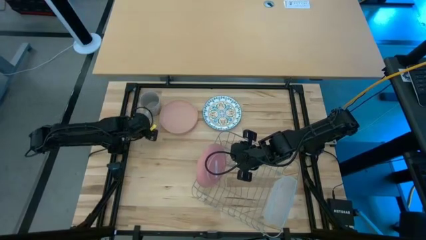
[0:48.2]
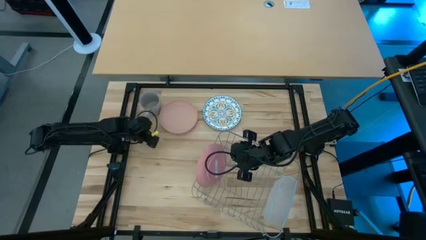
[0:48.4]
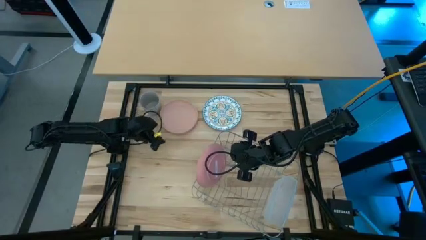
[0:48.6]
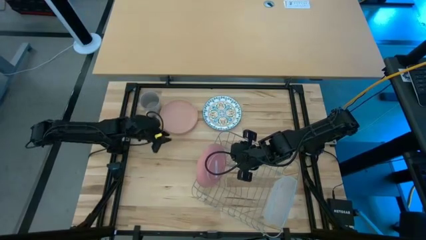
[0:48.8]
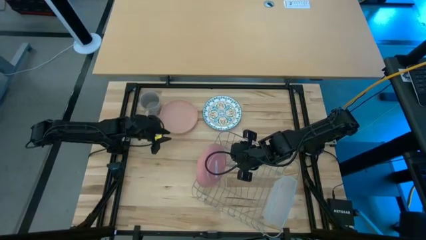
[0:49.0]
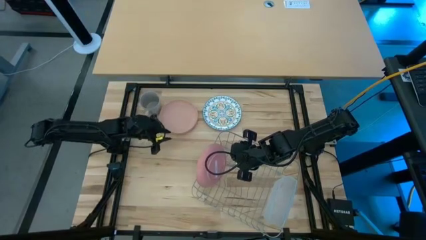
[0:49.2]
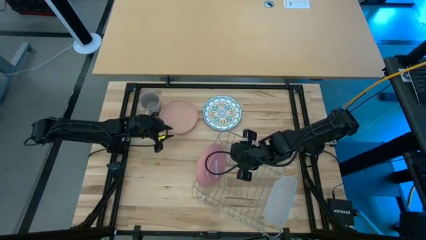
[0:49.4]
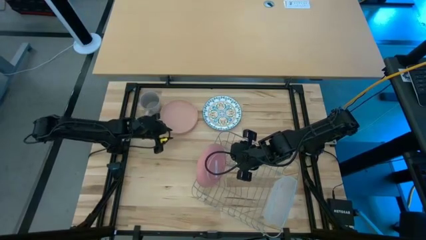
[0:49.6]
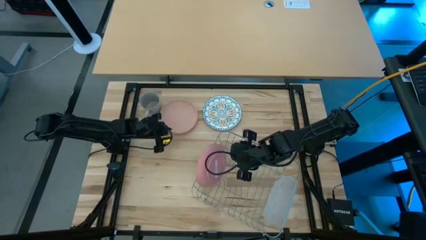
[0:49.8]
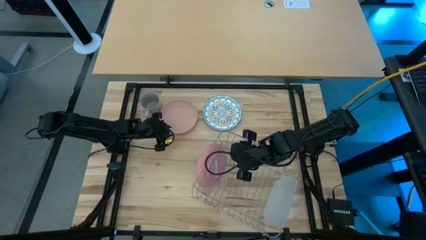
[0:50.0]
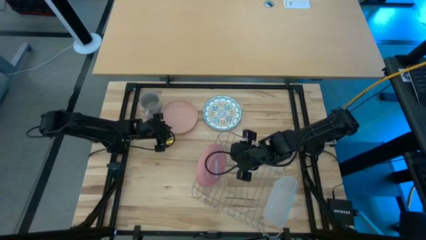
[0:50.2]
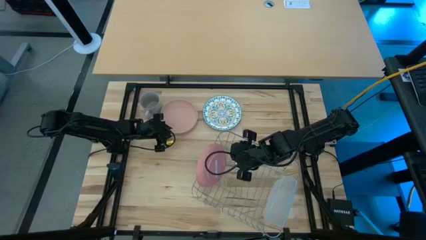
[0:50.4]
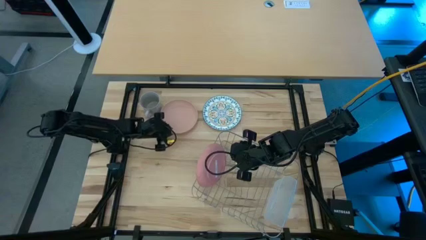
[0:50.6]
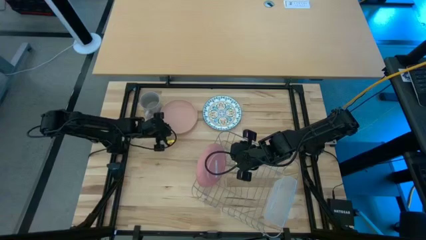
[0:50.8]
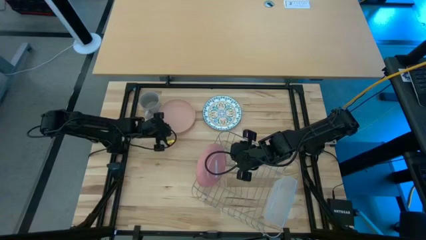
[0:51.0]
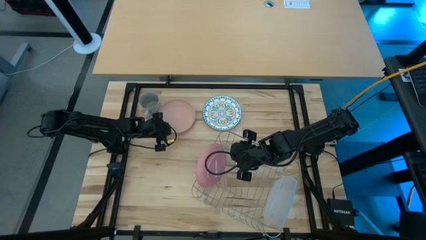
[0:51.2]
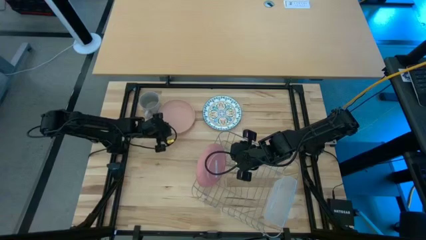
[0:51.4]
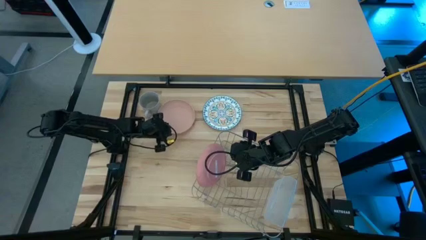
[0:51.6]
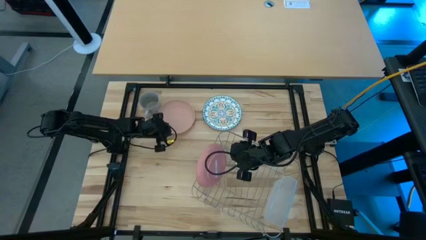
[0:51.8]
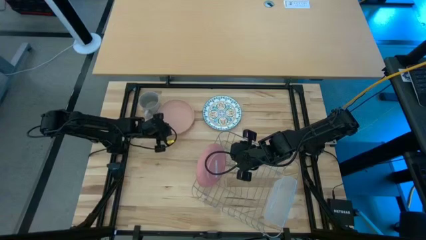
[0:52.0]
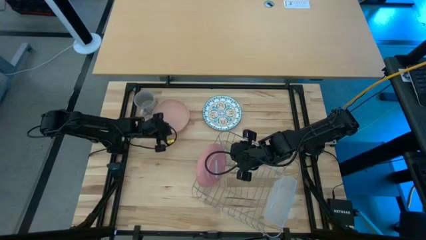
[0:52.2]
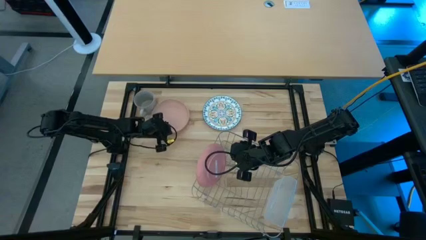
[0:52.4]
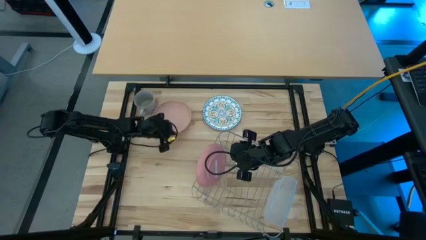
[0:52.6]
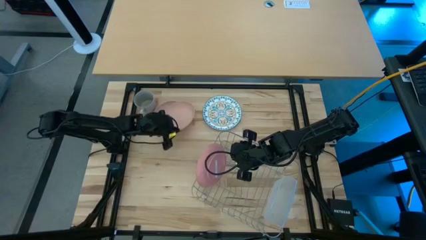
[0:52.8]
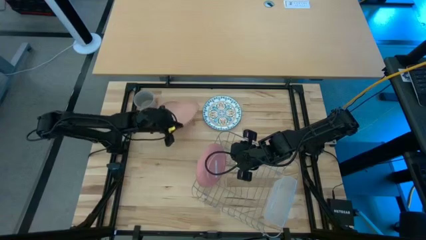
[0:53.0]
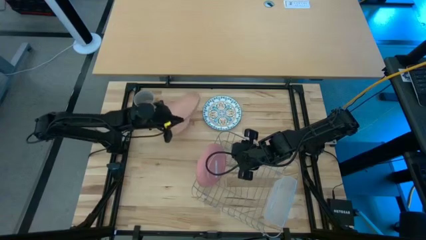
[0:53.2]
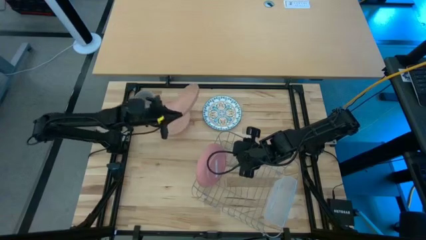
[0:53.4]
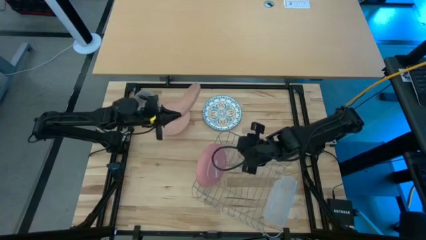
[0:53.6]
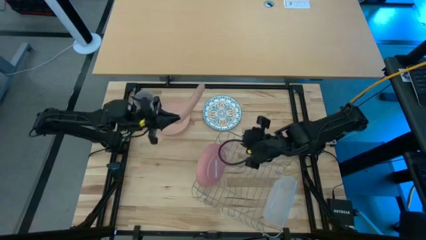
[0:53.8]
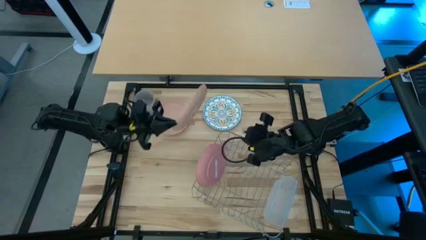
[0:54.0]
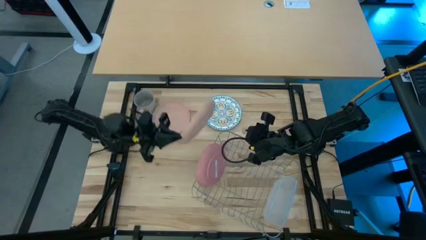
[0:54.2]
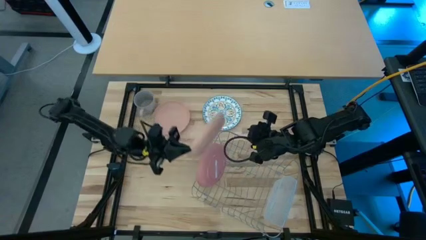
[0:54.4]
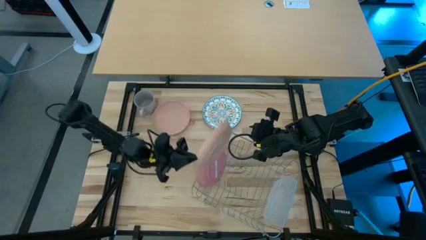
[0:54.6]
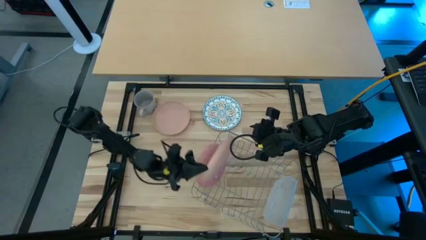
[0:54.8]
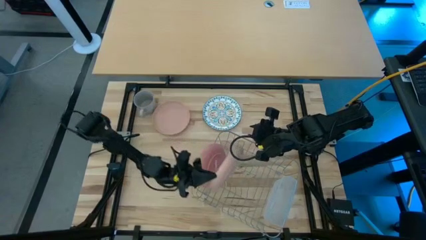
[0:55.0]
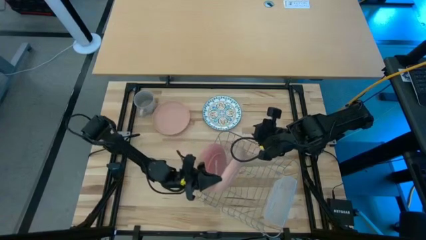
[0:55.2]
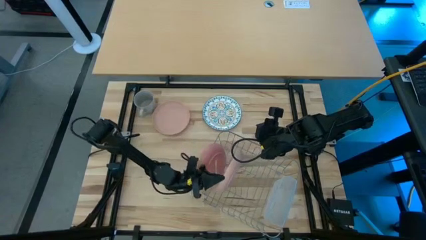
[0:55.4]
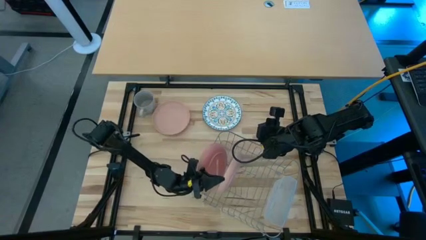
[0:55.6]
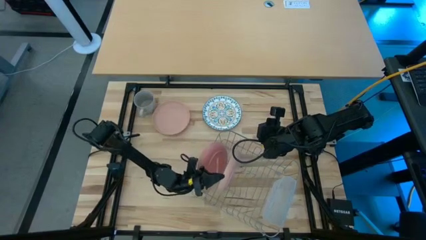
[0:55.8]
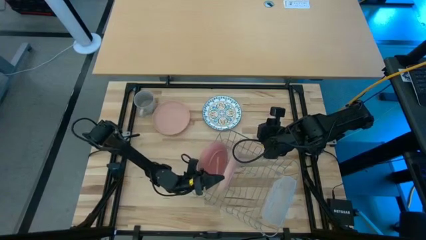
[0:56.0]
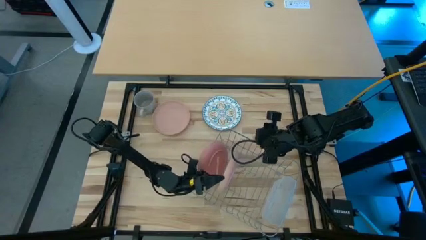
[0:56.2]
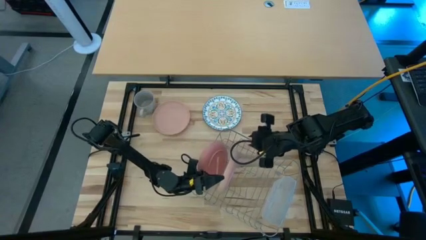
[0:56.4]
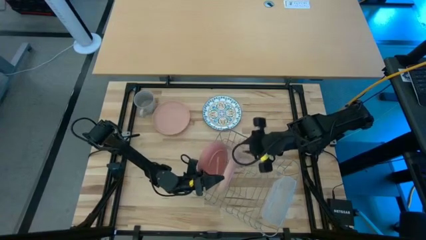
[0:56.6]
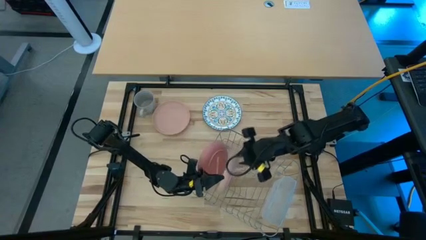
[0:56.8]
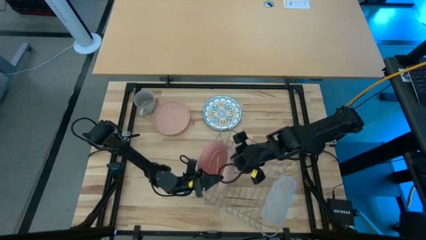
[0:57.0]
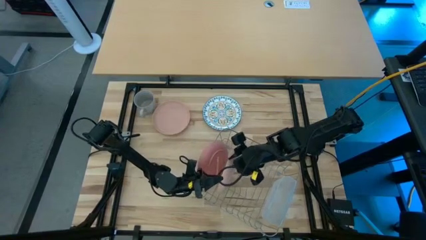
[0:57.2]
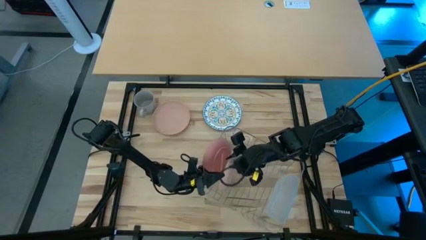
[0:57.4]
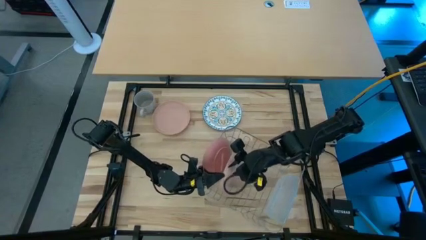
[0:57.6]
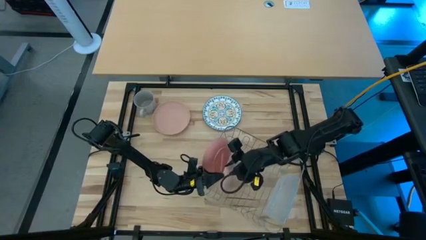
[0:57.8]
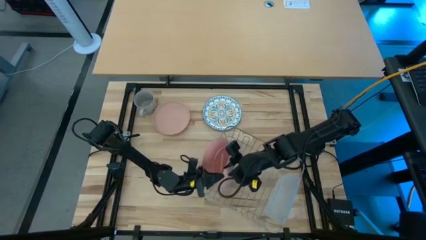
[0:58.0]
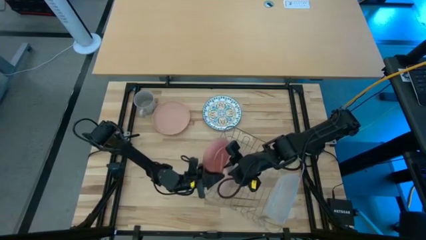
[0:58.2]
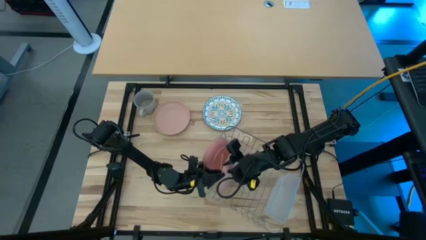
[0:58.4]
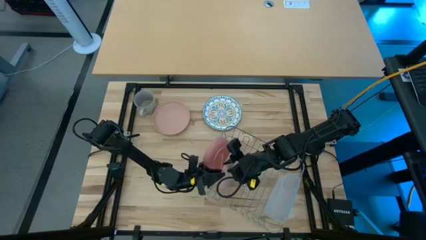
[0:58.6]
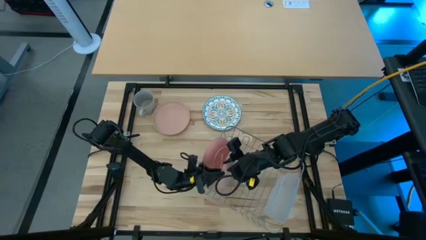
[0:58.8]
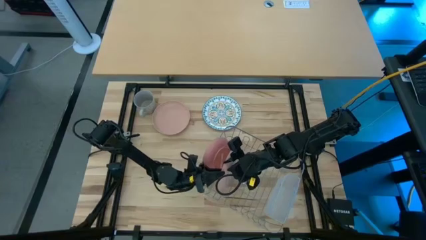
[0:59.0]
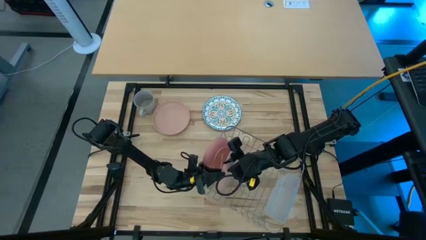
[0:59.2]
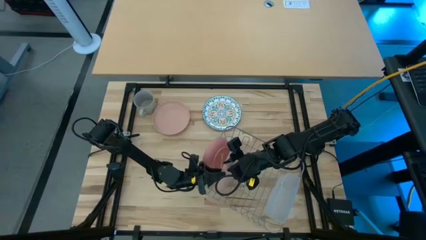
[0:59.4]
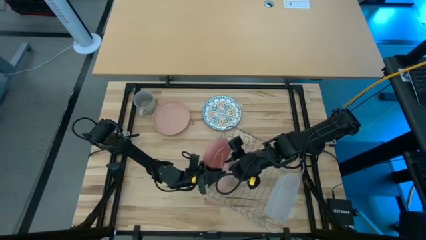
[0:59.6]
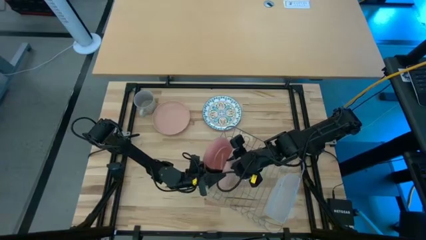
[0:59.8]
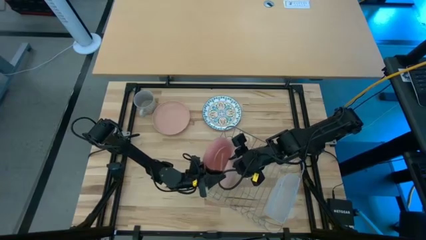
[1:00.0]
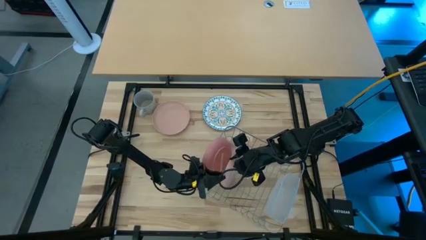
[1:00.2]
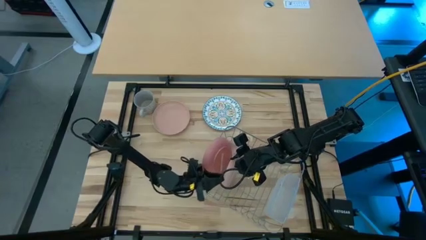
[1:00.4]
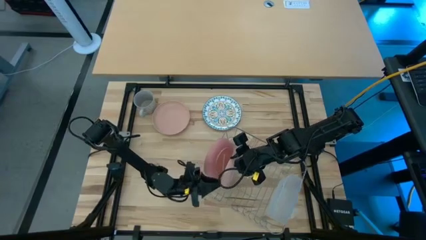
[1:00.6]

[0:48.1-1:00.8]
Task: Sort dishes
Put the top orange plate into the dish rack

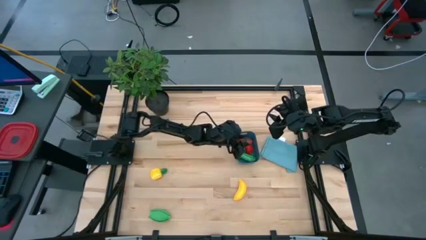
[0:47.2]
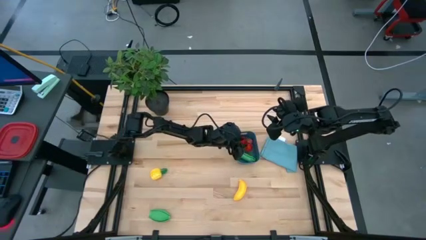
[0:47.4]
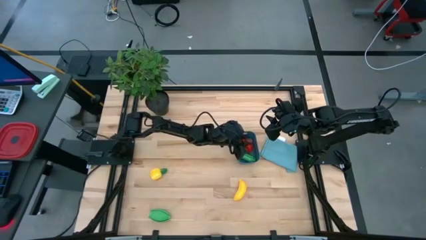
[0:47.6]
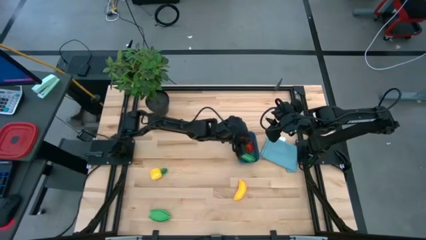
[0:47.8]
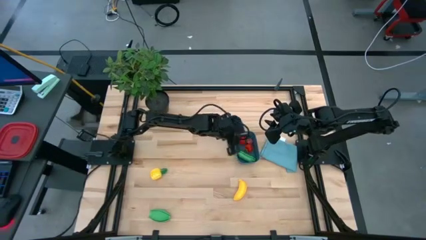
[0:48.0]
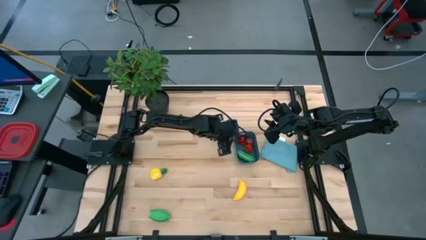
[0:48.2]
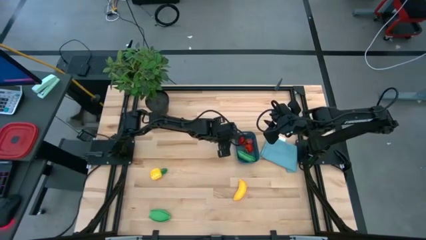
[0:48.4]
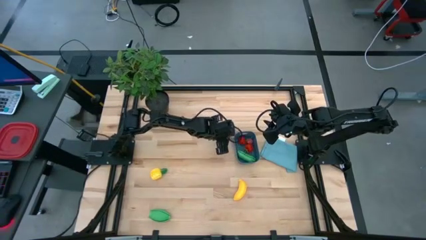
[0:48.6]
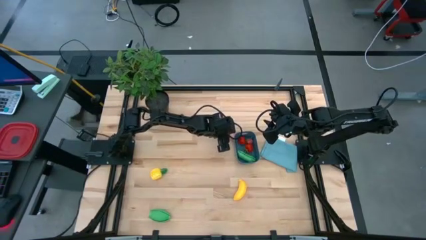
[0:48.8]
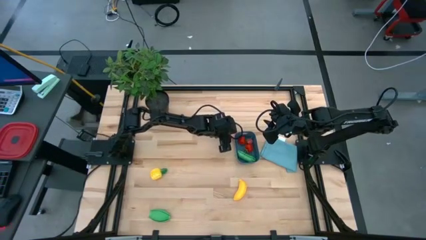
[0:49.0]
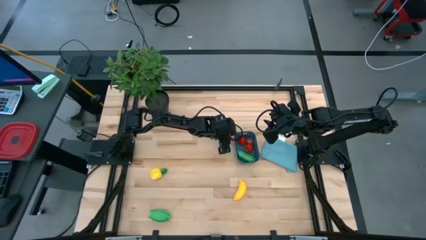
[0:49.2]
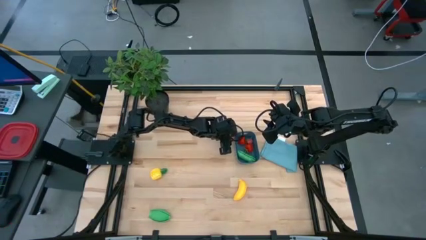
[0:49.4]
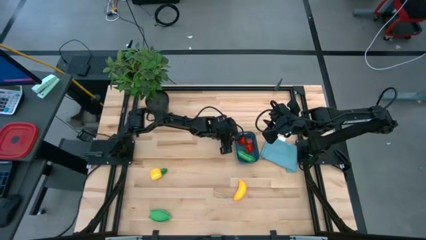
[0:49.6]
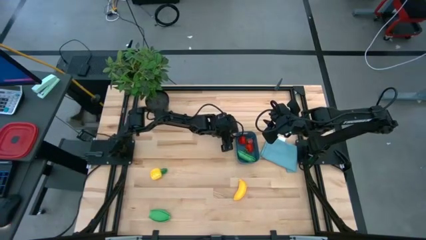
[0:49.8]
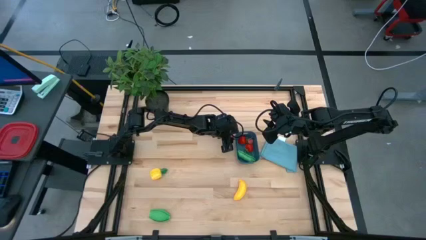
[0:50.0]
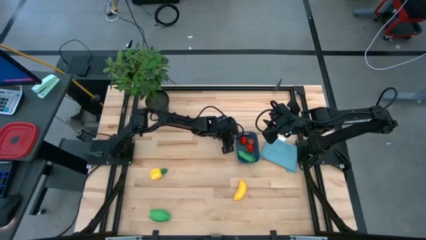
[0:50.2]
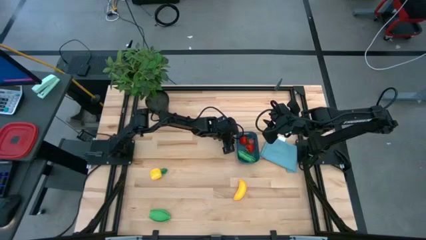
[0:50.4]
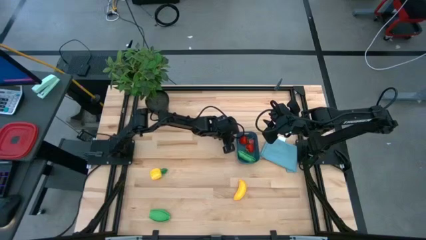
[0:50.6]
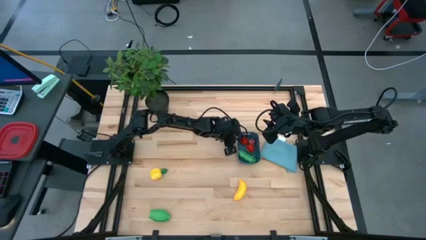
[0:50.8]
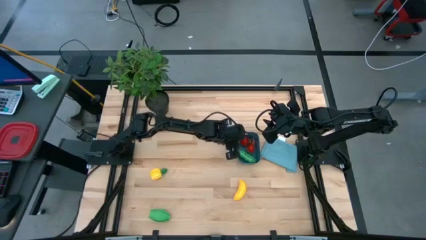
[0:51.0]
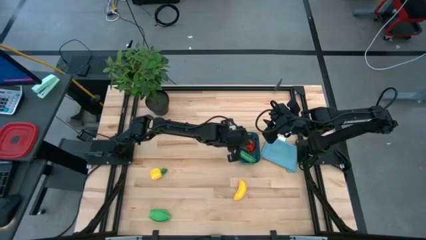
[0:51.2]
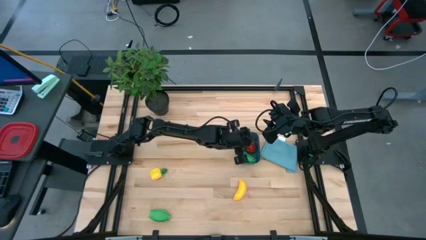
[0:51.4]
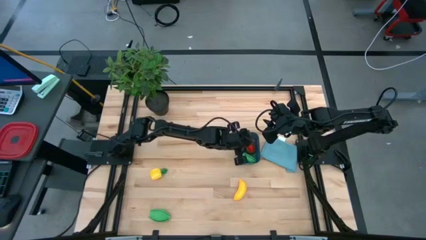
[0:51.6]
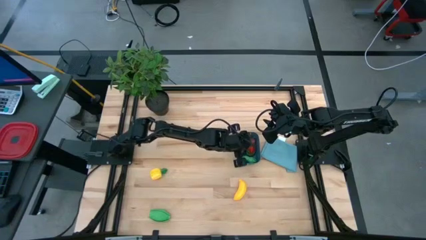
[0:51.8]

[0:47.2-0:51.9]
Task: Pick and placing Produce into tupperware
Put the pink peach into the blue bin
